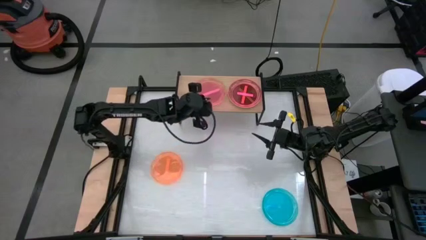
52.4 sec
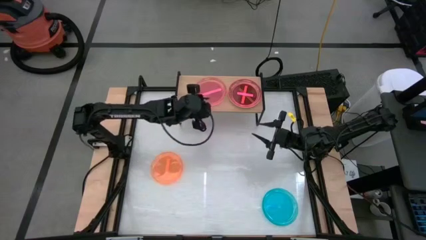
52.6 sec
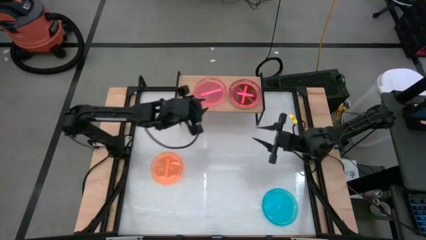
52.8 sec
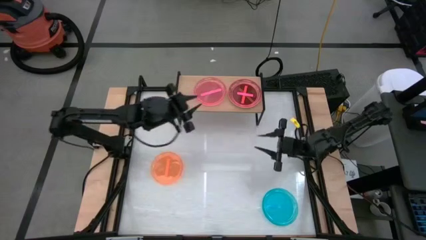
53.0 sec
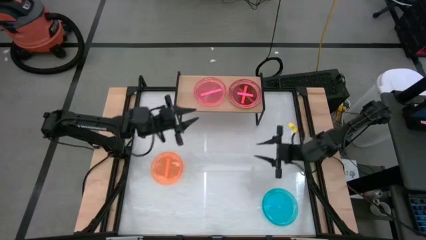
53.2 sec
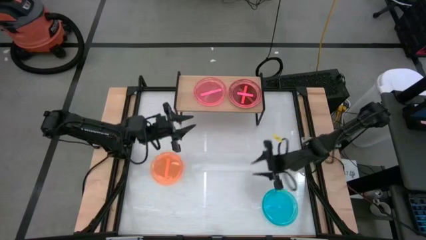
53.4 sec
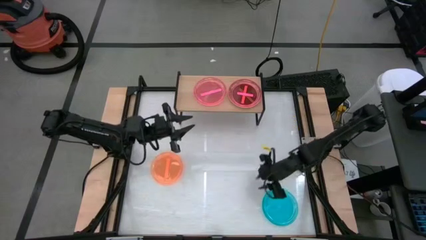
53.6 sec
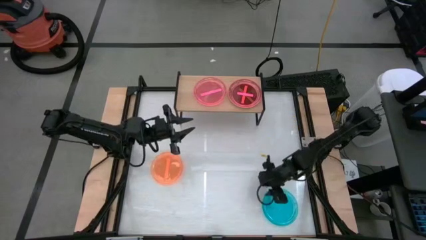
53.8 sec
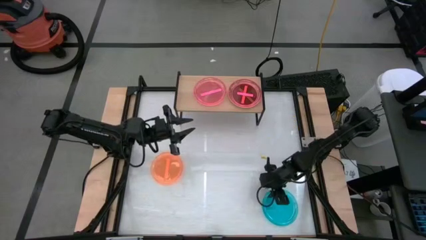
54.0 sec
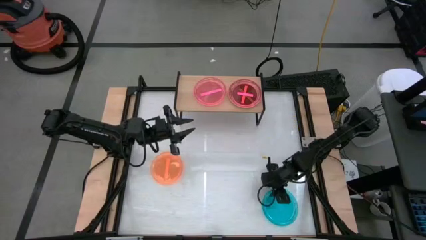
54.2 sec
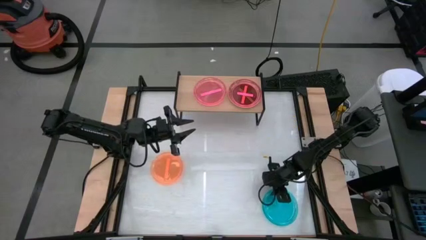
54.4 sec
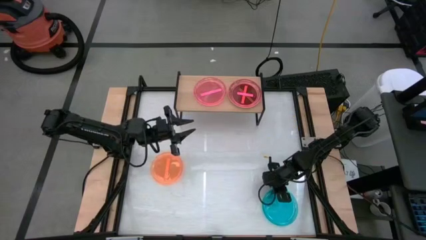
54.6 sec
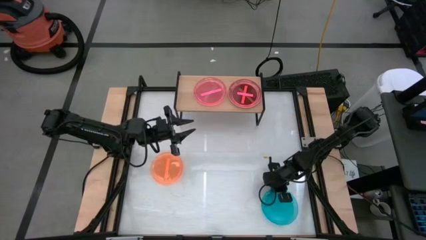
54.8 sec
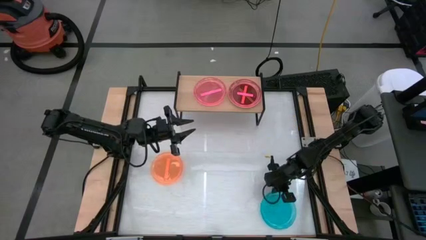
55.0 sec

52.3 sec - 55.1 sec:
Task: Place and stack plates onto a shelf
Stack the blue plate on top of the pink plate on the shelf

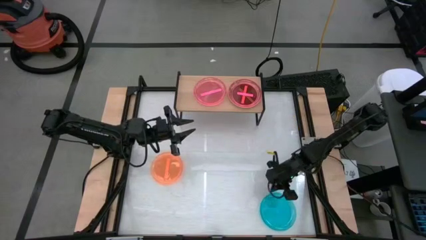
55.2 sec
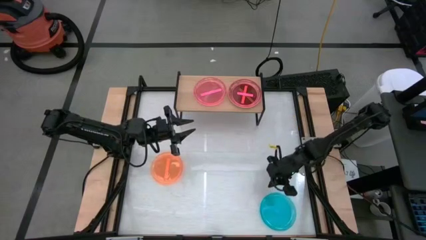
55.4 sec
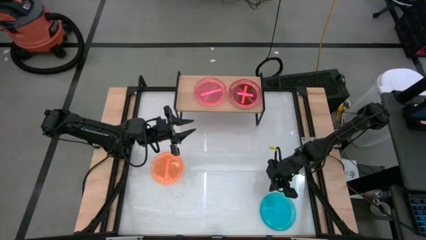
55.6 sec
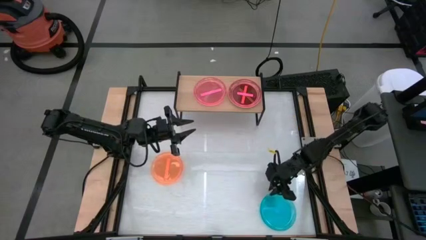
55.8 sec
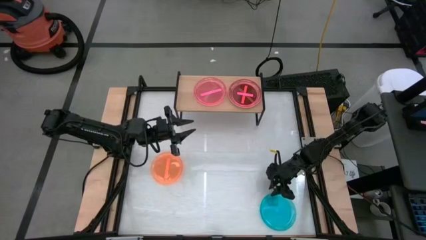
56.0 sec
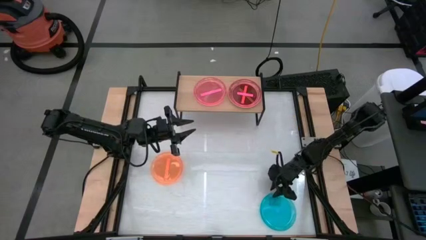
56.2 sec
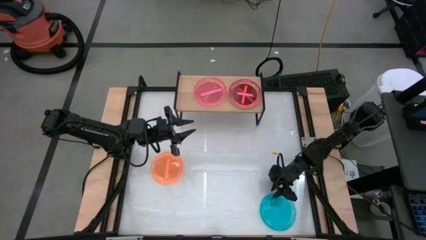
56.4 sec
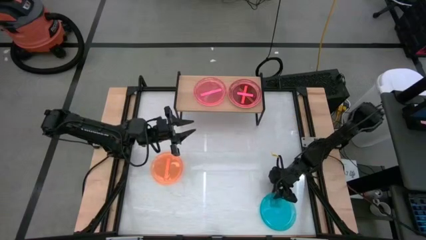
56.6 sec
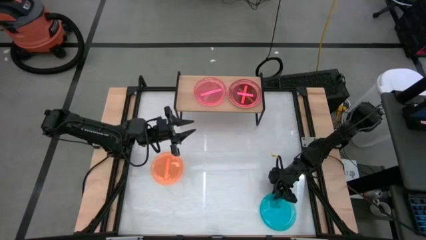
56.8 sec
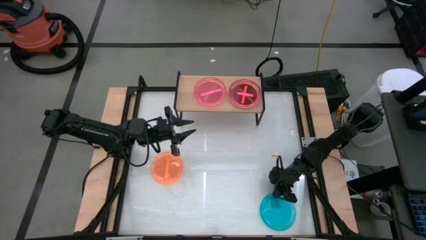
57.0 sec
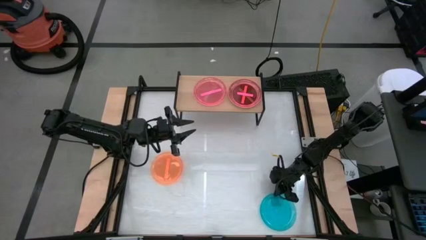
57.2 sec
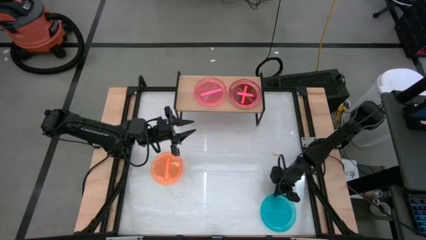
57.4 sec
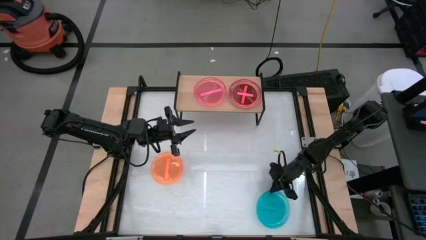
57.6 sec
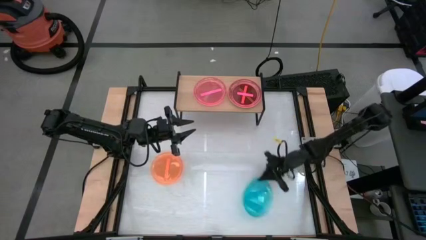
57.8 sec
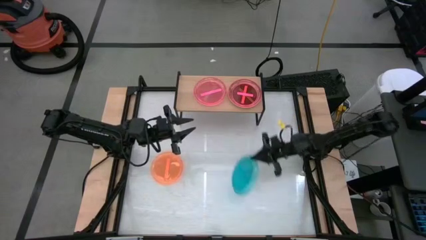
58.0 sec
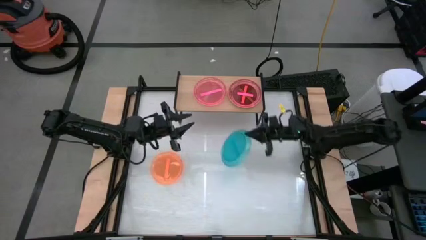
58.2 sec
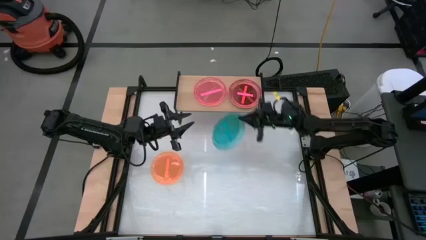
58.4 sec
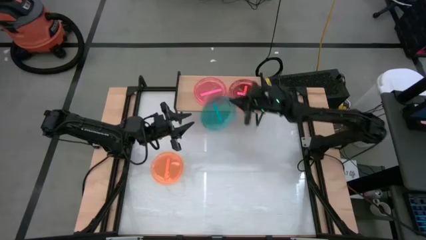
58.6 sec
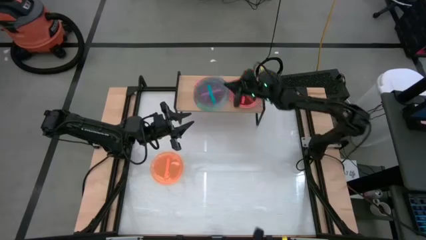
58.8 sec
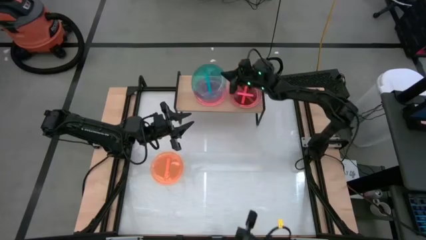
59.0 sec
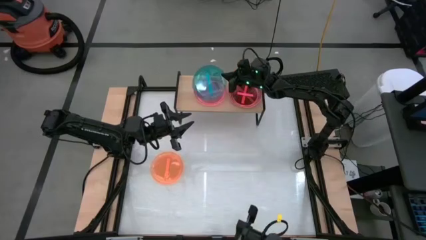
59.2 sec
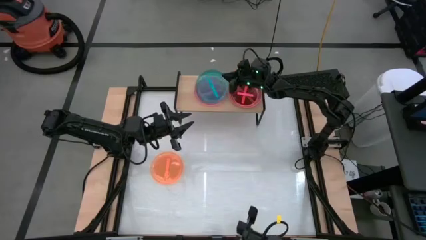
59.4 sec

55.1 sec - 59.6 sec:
Stack the blue plate on top of the pink plate on the shelf

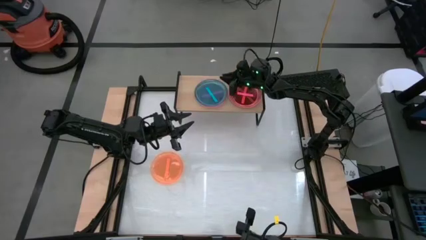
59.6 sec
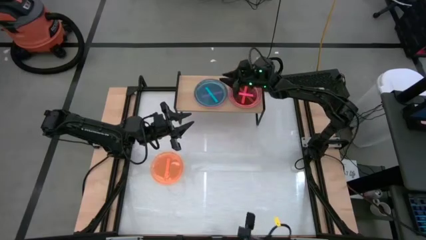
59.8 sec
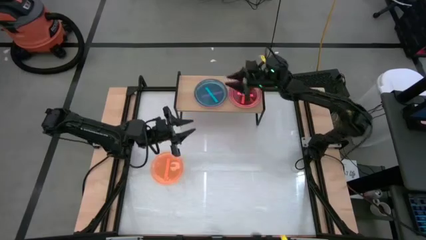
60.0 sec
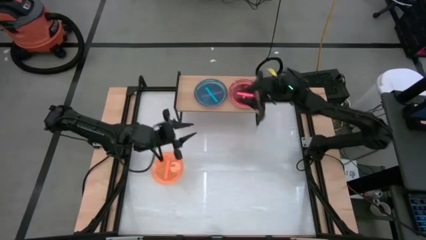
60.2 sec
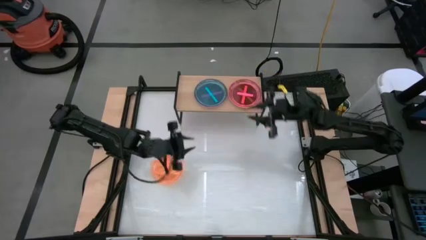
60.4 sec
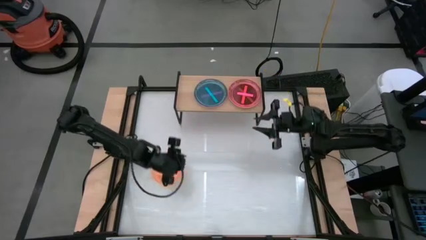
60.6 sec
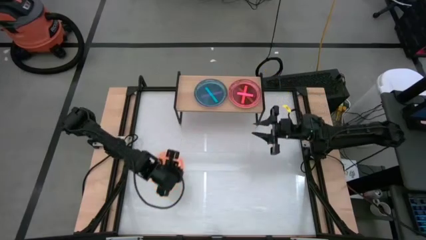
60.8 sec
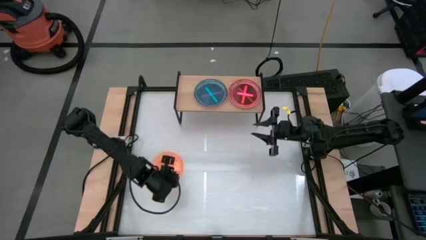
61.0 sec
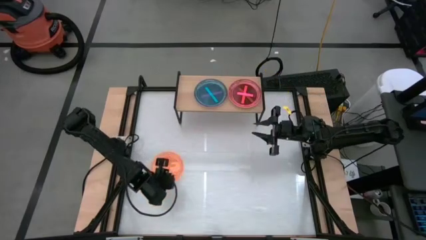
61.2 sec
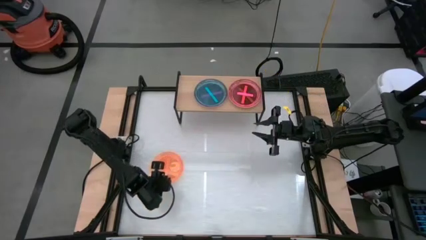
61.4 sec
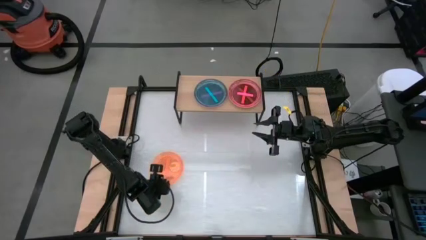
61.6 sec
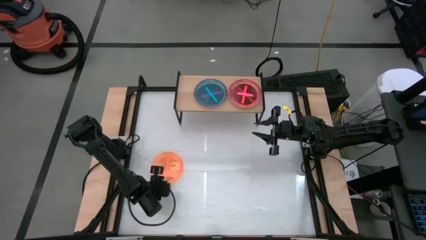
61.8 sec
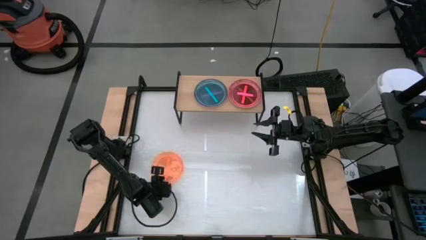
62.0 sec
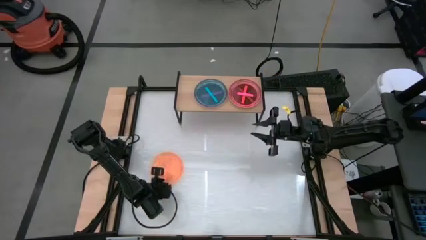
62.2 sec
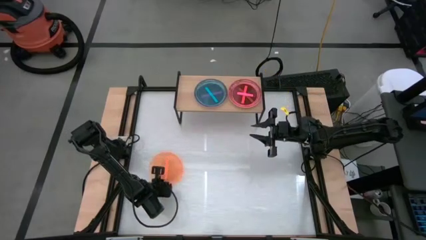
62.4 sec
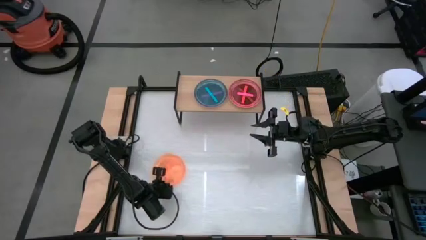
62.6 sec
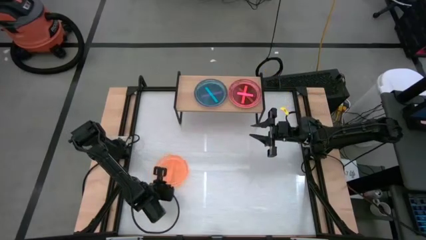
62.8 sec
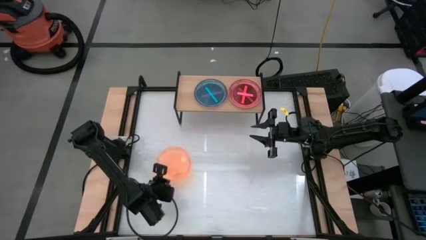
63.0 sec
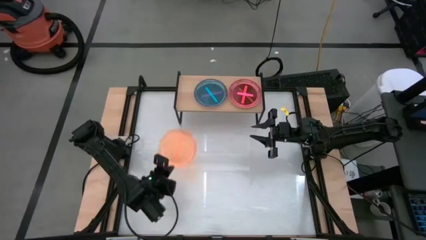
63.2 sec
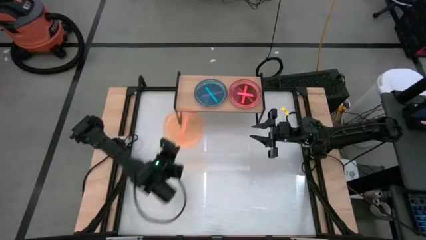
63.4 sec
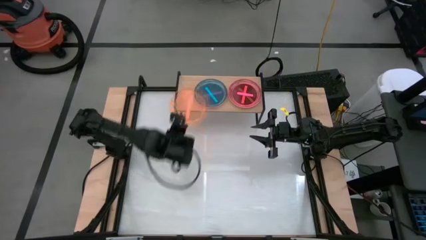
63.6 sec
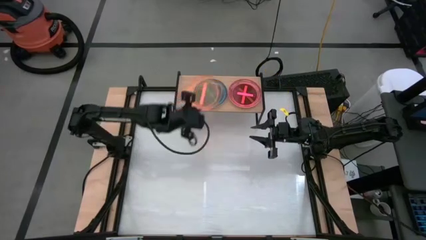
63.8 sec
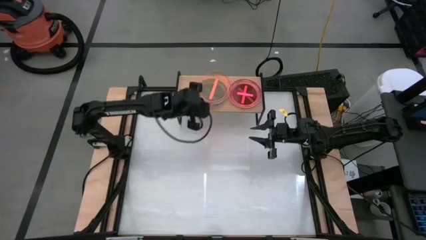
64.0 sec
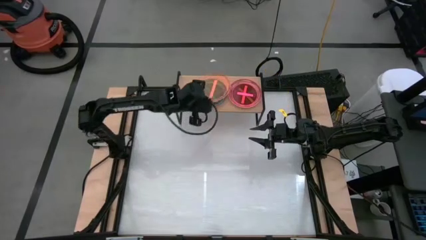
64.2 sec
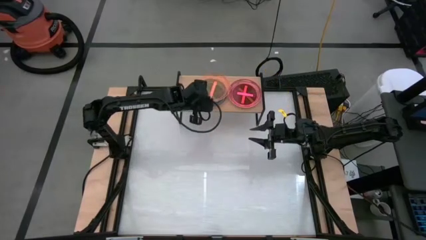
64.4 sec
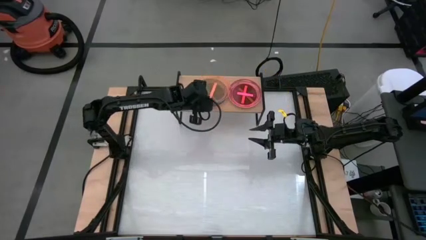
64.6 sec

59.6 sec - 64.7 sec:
Stack the orange plate on top of the blue plate on the shelf

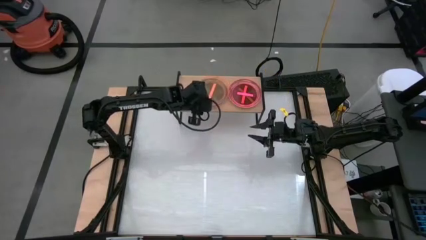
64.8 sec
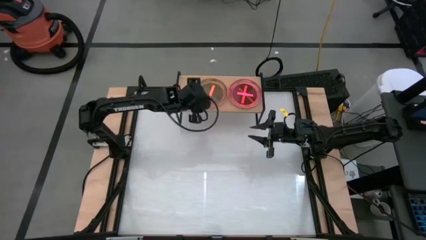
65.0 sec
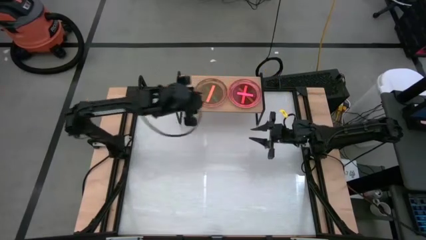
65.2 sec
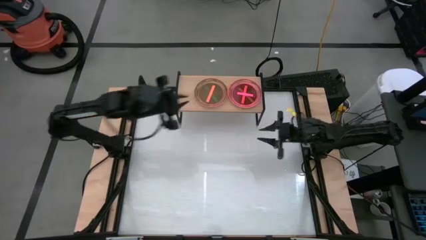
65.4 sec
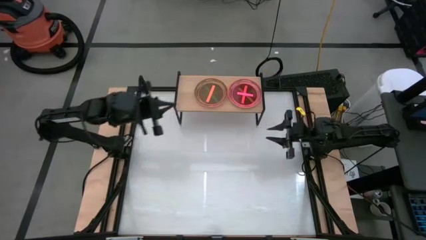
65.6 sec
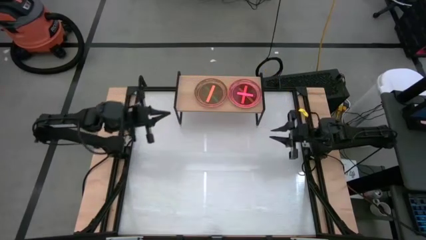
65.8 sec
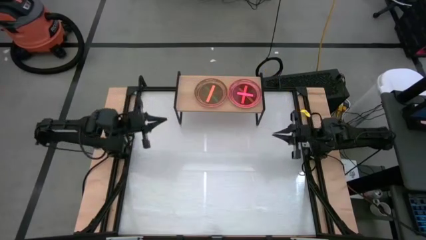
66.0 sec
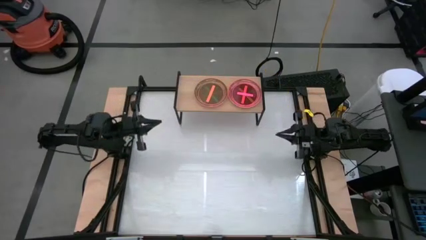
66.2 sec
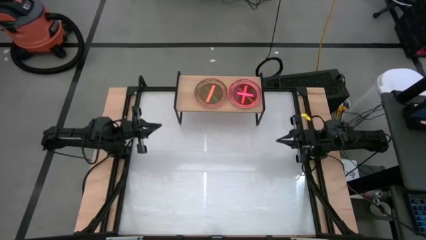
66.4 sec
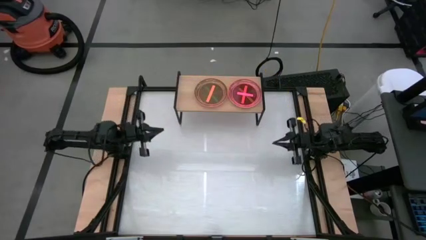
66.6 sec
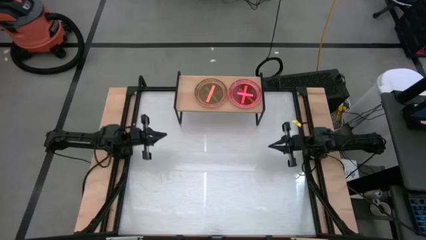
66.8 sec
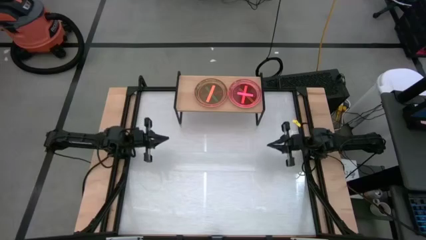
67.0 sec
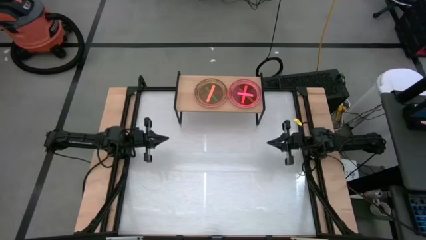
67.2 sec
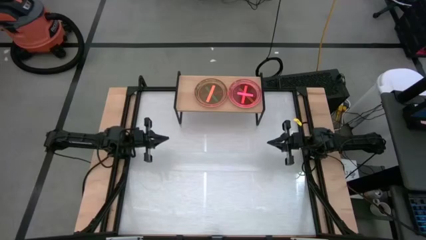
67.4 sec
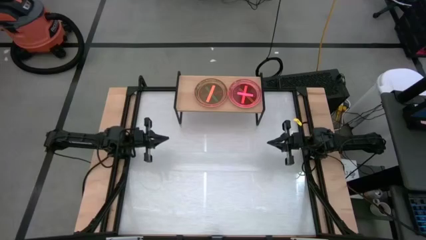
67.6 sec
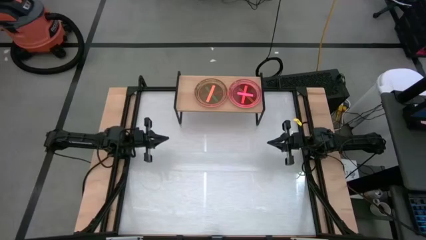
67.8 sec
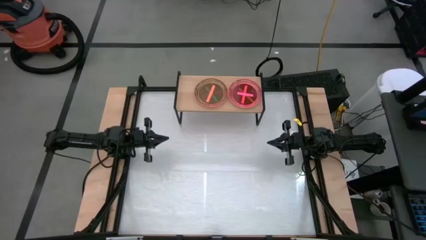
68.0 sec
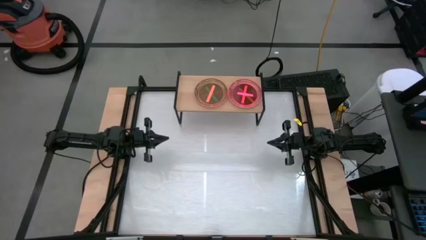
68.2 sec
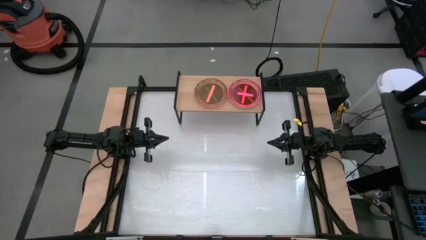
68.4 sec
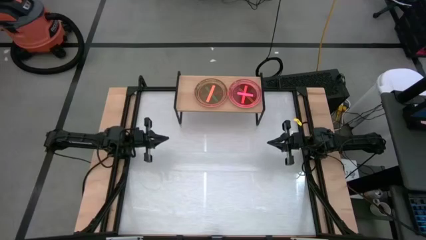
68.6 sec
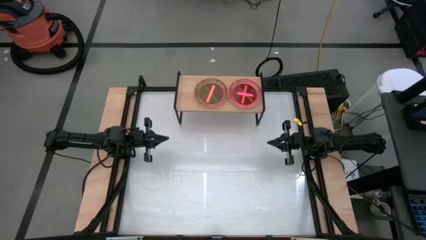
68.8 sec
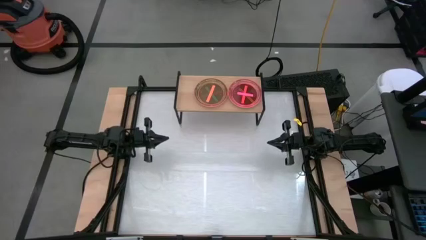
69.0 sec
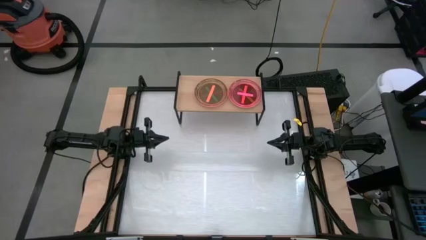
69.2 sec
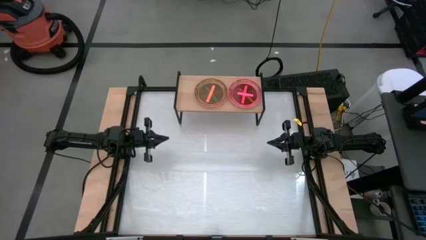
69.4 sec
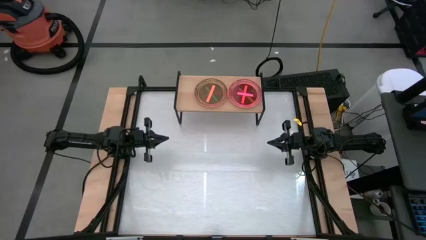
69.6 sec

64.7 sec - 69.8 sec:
Return to Home Position
